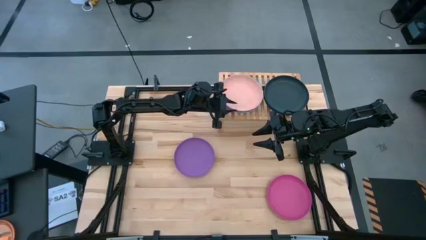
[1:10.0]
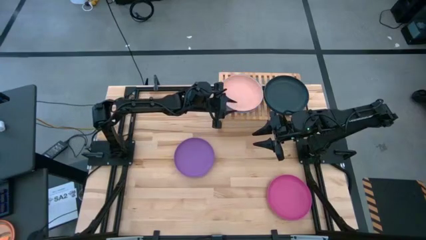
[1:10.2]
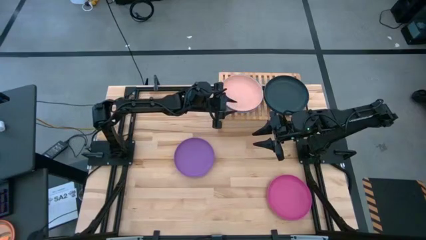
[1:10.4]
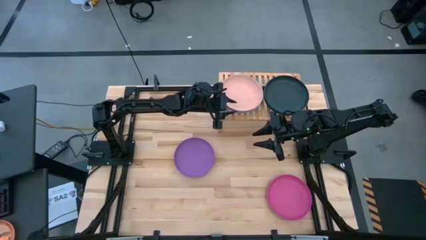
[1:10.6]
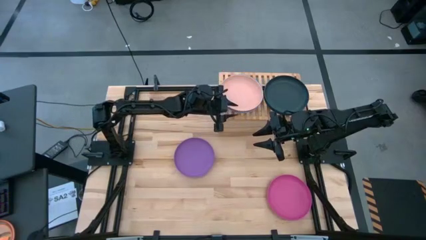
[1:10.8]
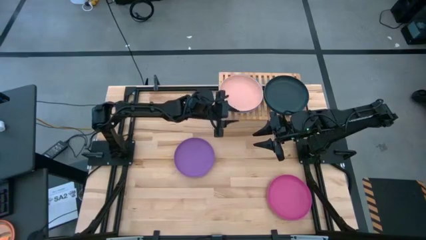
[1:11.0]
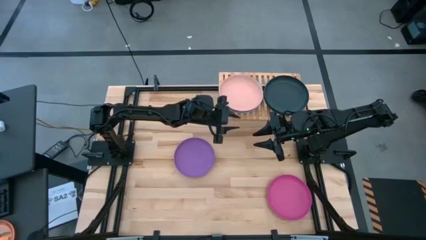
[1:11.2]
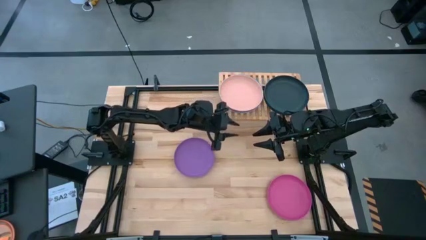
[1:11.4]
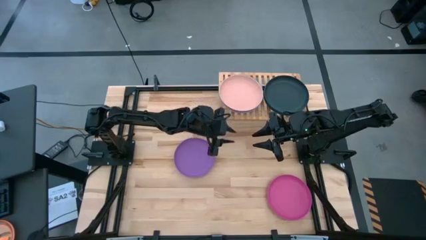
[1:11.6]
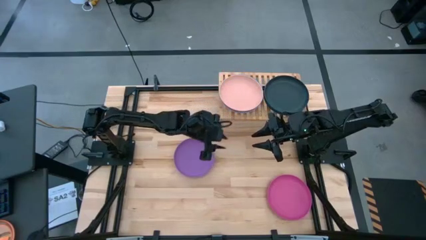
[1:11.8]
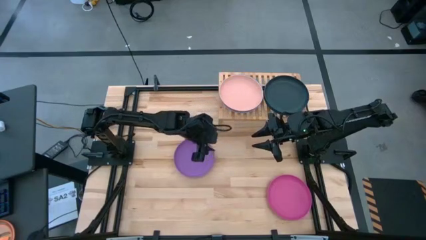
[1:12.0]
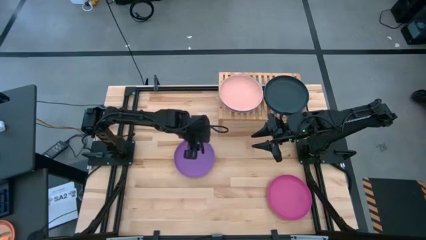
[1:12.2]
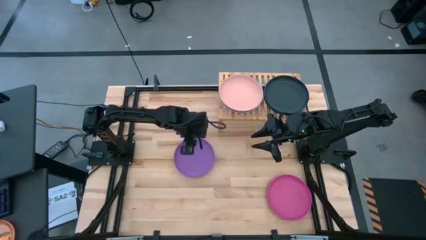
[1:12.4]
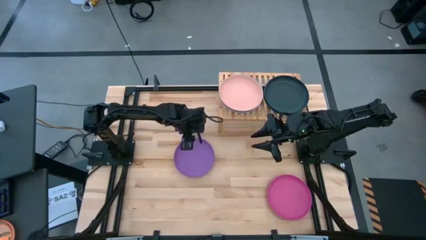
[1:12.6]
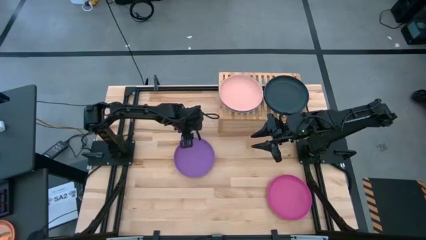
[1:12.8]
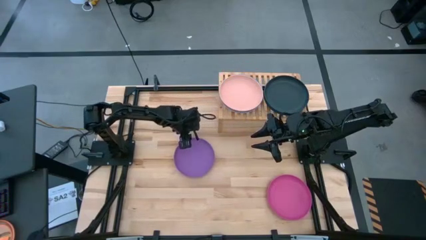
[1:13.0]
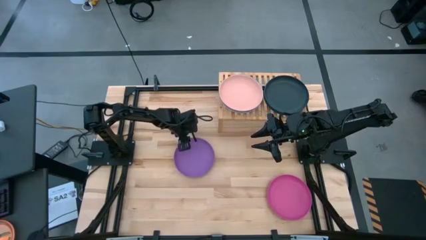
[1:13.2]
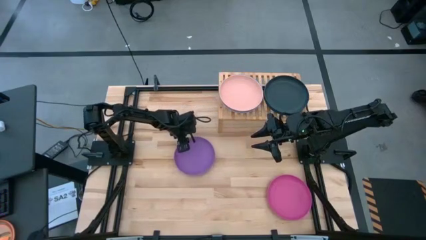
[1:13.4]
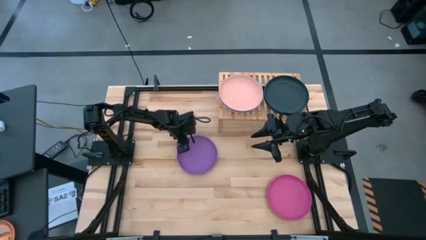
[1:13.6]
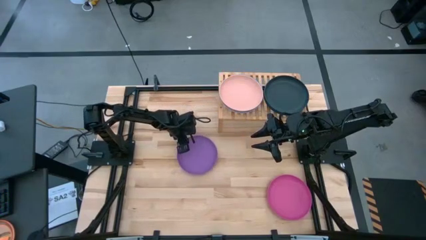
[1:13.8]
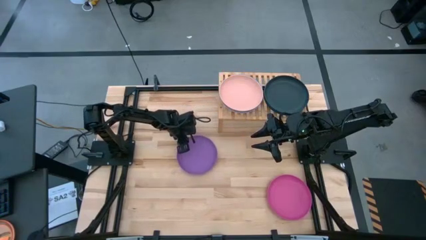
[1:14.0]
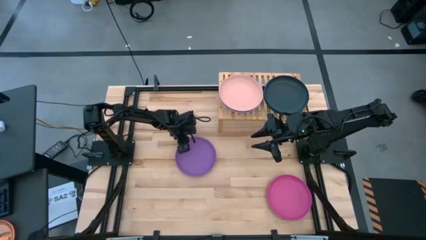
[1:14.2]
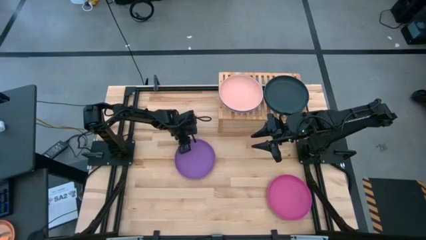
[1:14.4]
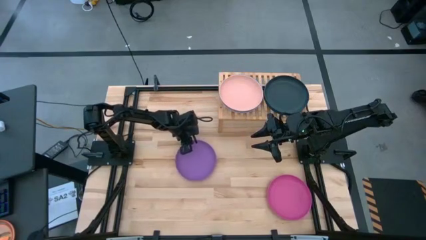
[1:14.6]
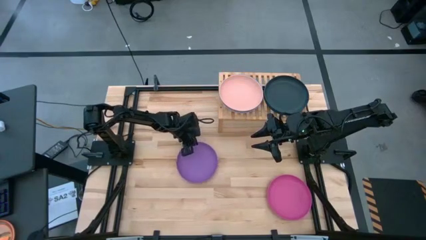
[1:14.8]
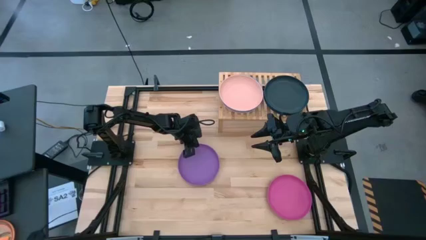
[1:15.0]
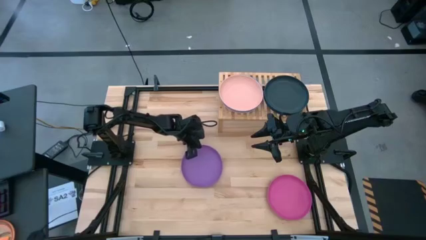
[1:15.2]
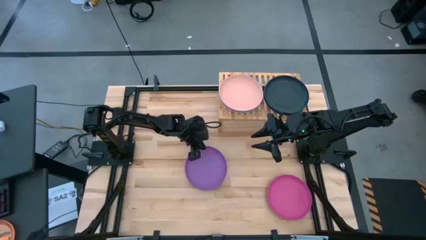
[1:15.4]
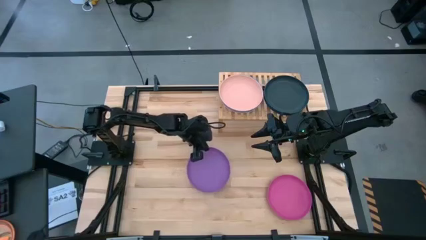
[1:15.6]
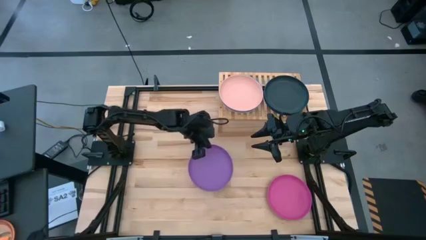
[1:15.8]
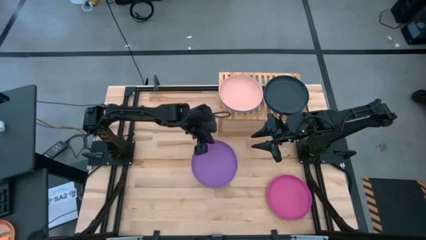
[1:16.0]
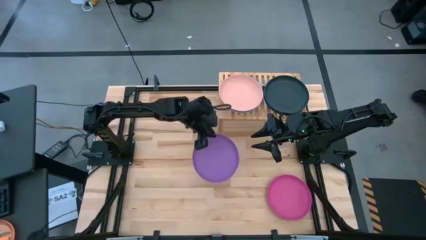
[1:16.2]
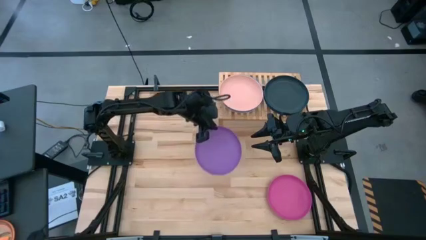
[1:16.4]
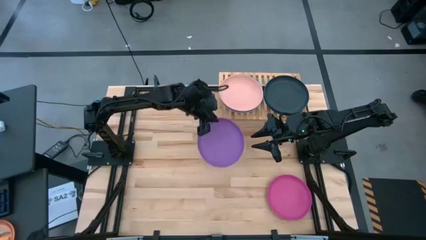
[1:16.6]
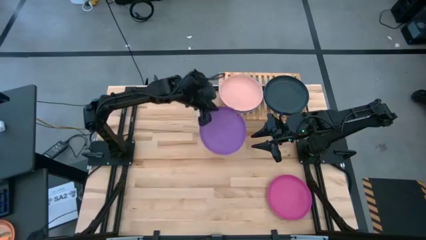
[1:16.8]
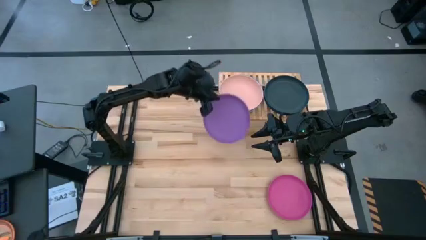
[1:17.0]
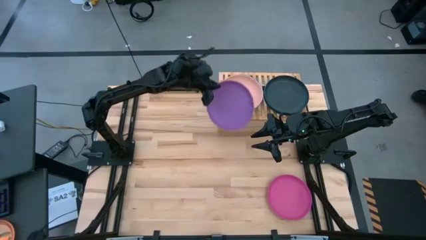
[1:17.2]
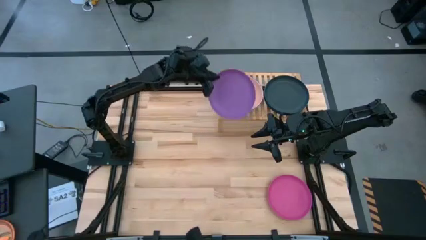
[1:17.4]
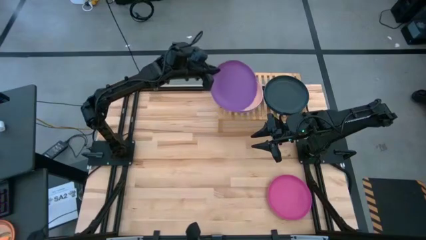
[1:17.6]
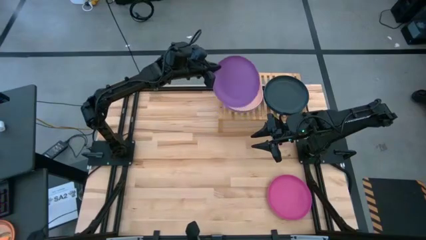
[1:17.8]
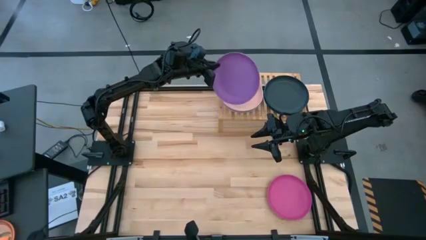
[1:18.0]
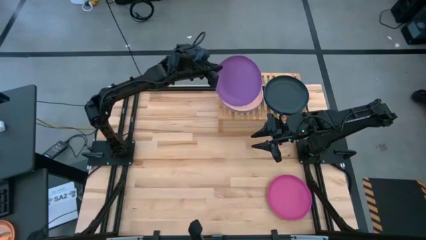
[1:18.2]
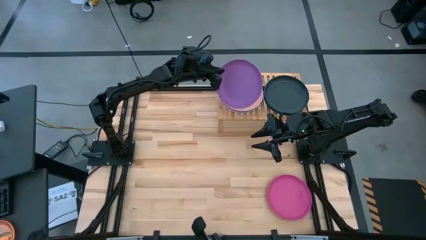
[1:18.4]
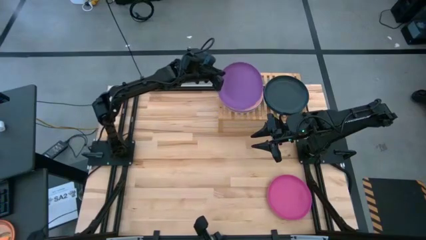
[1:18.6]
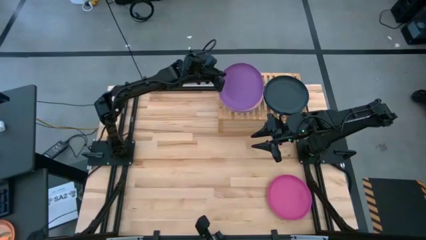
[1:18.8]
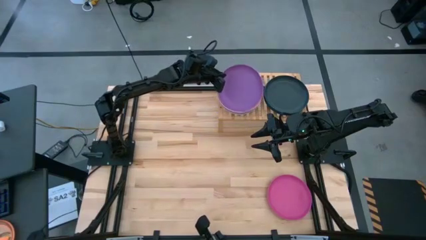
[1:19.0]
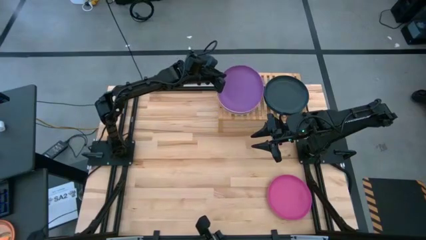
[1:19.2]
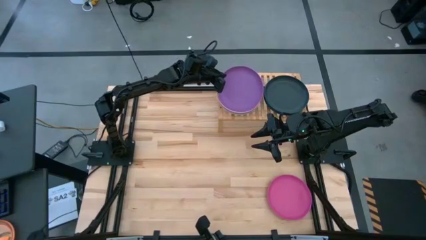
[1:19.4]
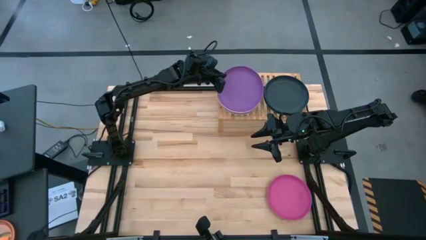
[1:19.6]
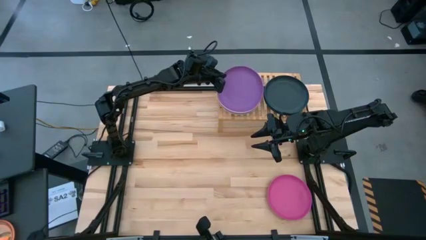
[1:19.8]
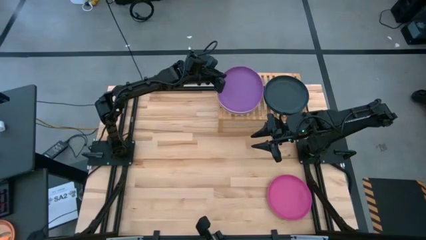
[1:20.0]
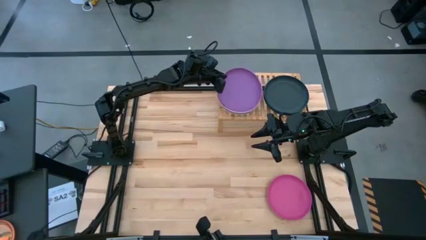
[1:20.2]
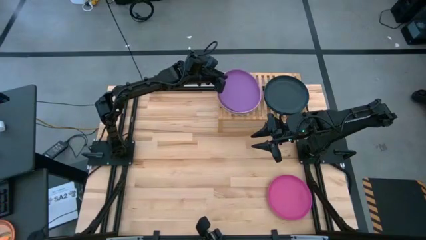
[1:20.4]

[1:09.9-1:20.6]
Task: Place and stack plates onto a shelf
Stack the violet plate on top of the light orange plate on the shelf

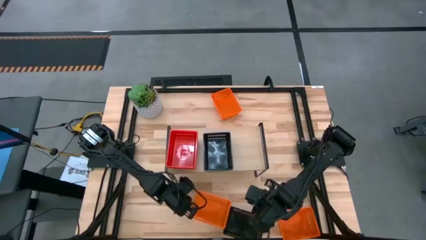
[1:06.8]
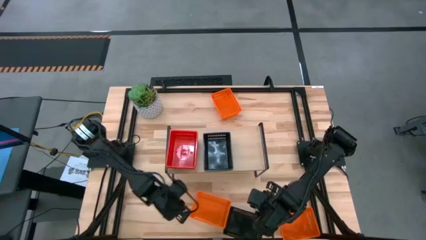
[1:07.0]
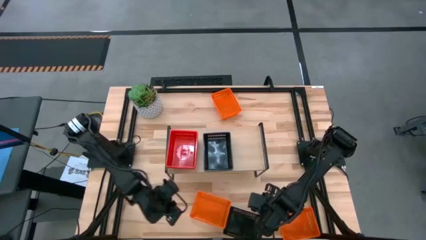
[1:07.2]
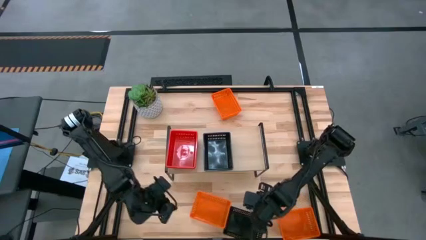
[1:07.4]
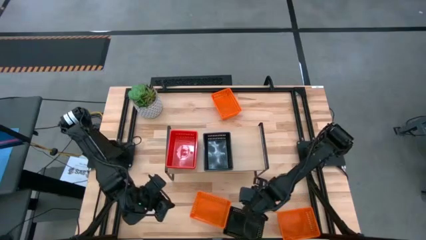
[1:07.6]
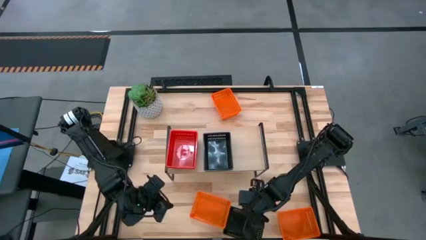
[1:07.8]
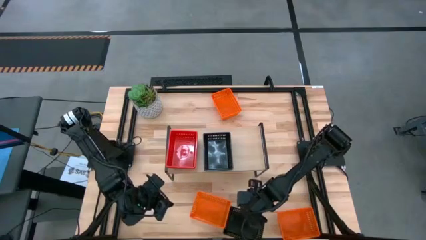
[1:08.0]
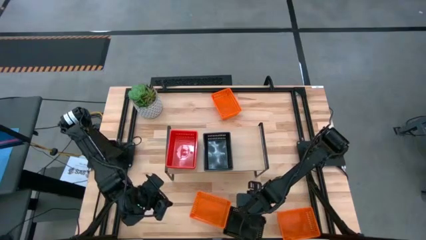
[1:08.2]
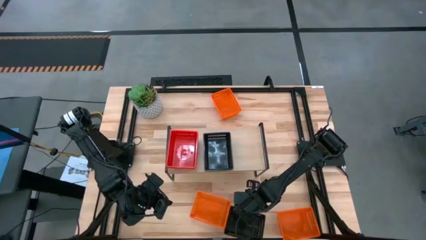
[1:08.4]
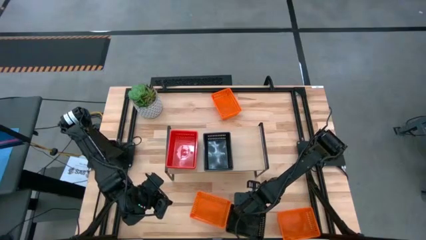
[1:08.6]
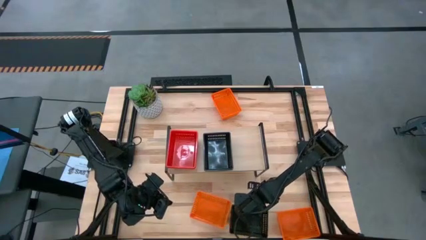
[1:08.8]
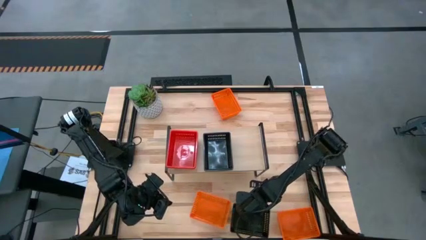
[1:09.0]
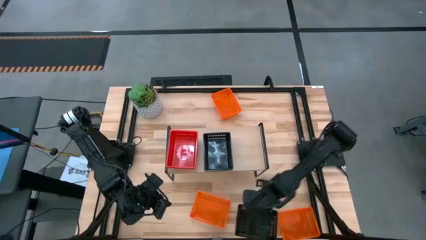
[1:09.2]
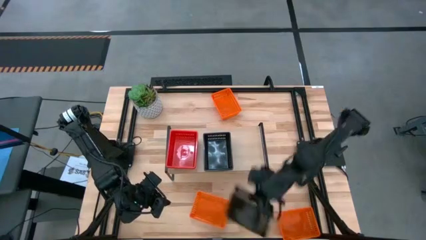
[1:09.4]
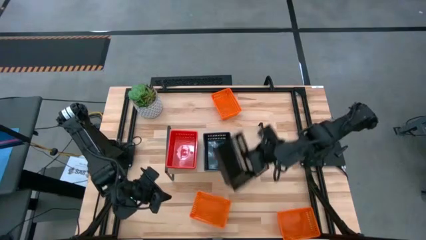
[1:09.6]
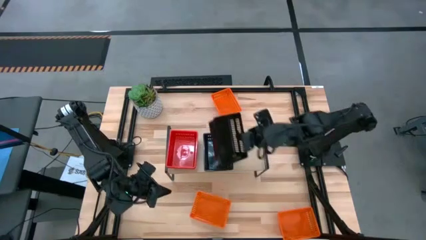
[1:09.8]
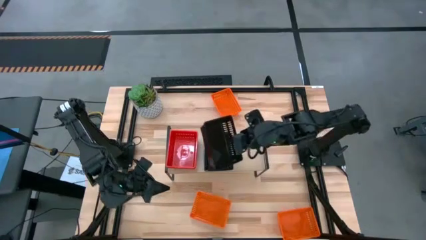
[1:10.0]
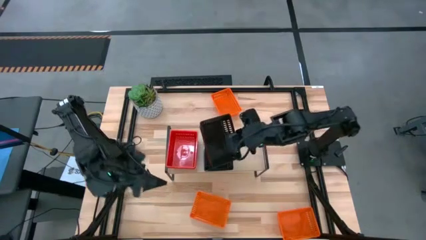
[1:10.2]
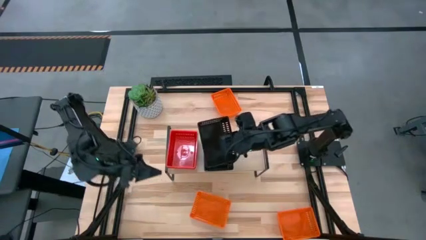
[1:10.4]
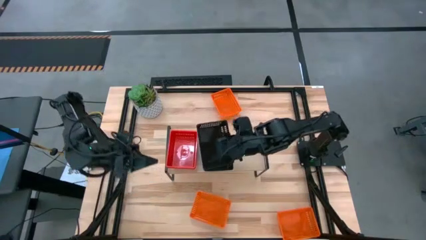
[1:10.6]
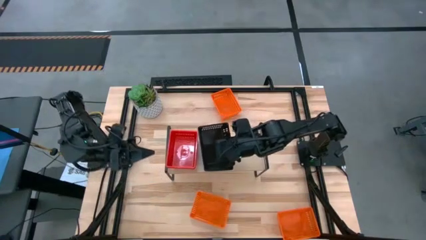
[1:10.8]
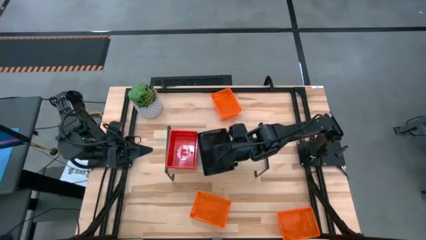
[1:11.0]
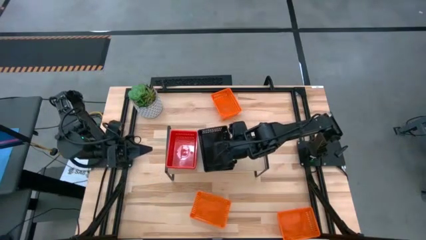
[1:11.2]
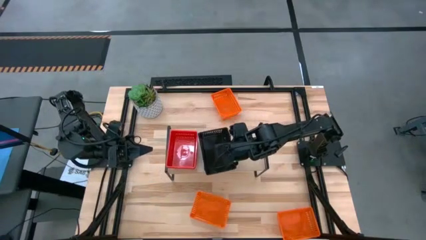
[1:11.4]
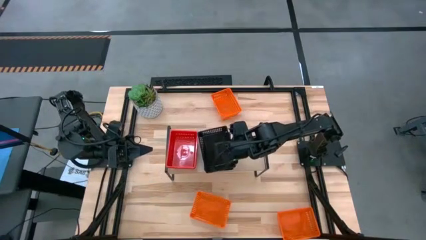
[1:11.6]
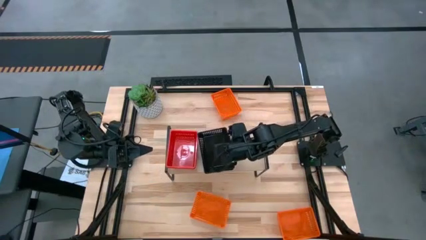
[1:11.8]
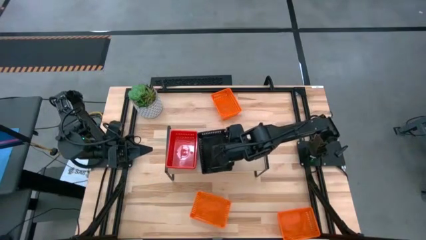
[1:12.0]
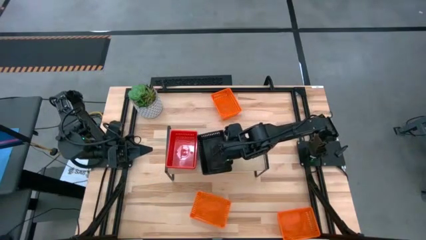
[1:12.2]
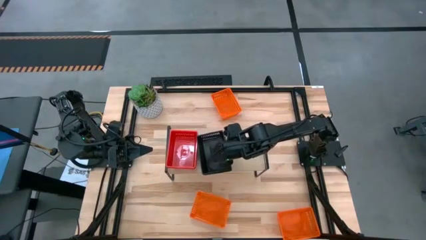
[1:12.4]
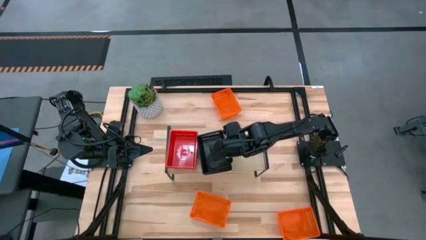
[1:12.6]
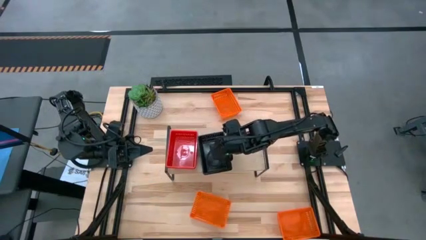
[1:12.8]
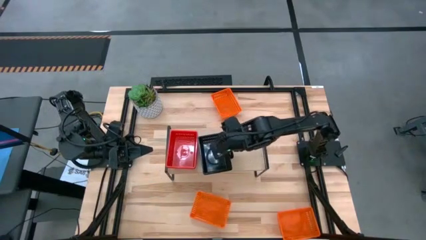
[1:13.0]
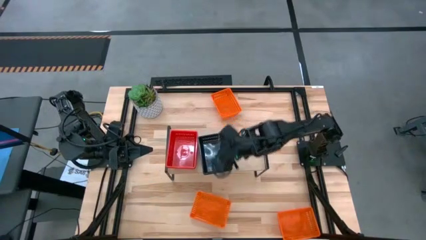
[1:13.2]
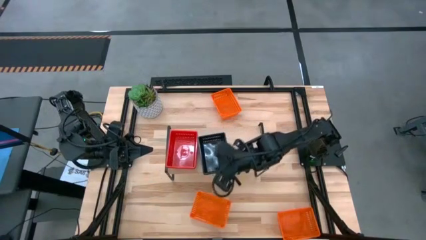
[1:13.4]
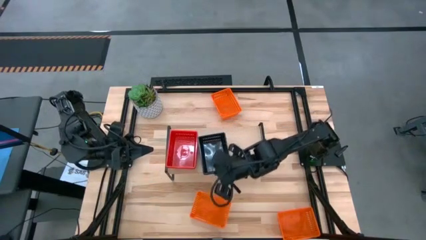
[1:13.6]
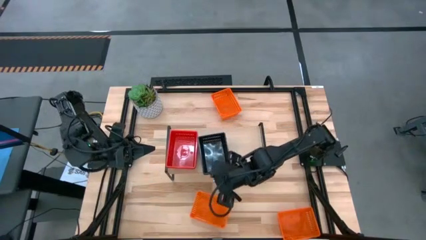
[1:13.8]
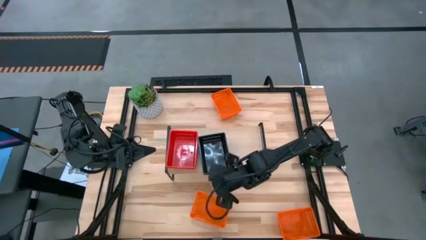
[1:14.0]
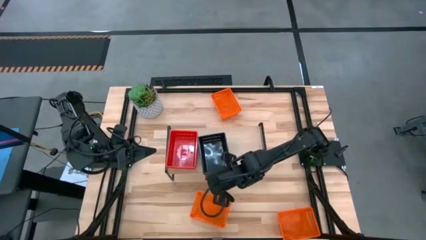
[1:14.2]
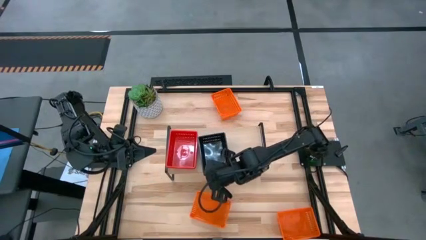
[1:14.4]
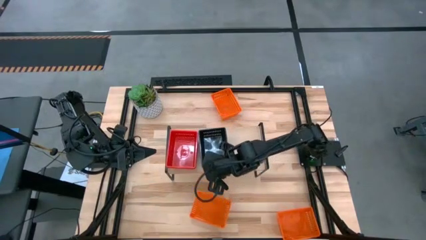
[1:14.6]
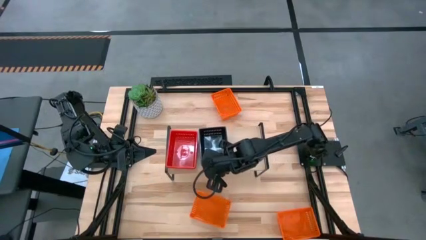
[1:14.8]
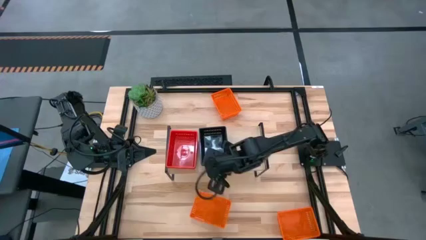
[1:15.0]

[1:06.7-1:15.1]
Task: Stack baskets on shelf by color
Stack the black bin on top of the other black bins on the shelf
